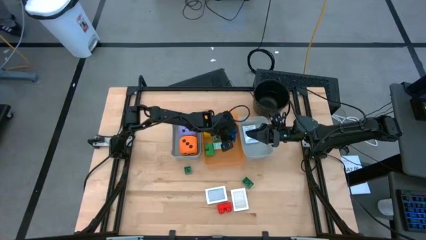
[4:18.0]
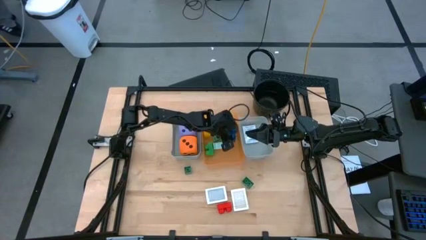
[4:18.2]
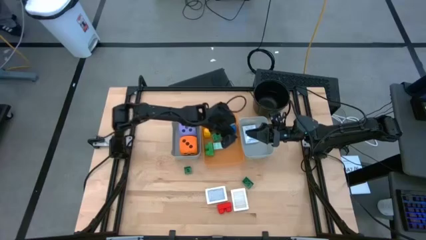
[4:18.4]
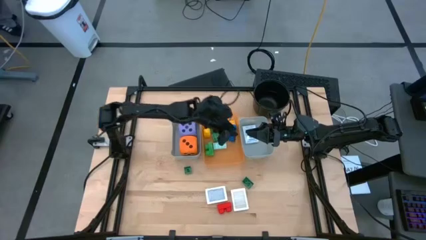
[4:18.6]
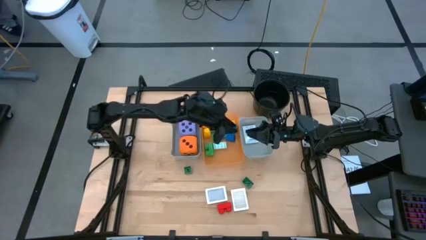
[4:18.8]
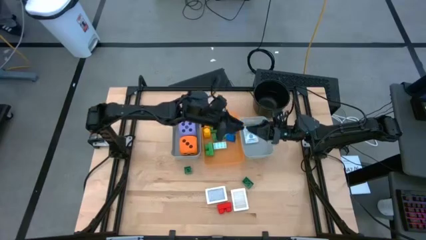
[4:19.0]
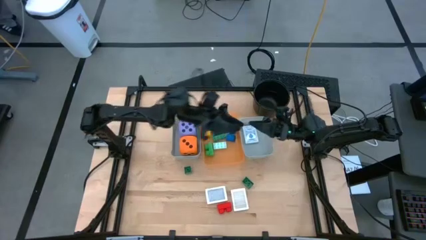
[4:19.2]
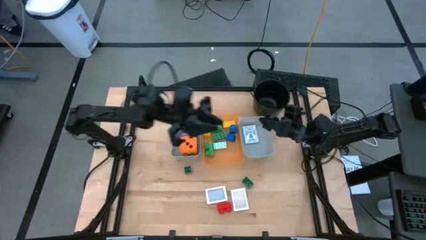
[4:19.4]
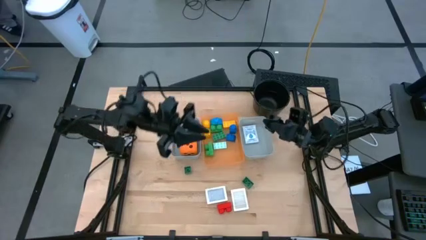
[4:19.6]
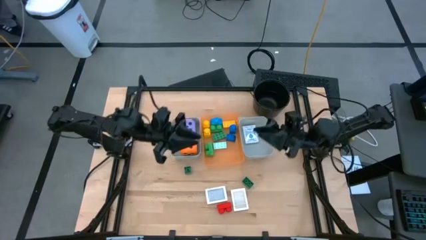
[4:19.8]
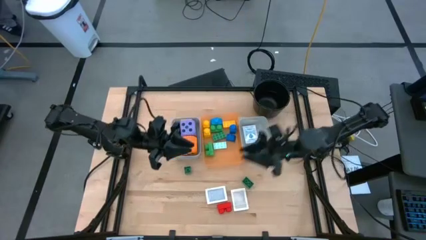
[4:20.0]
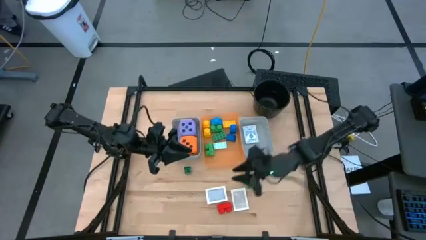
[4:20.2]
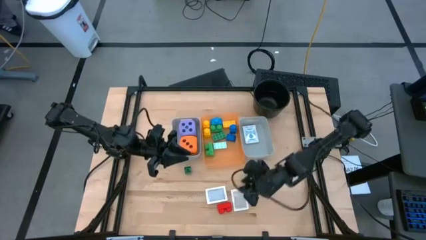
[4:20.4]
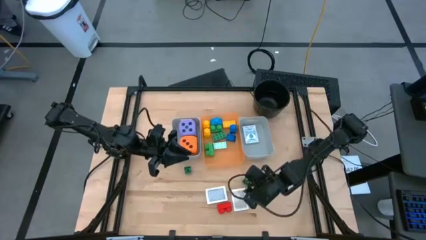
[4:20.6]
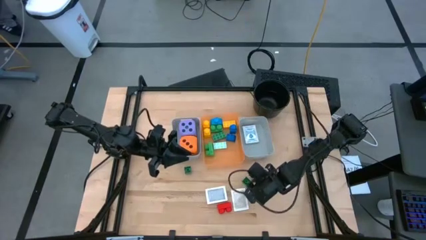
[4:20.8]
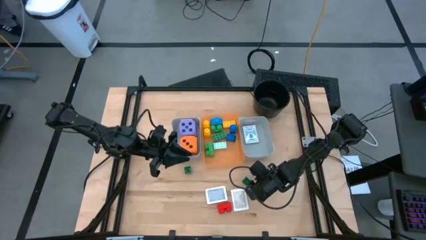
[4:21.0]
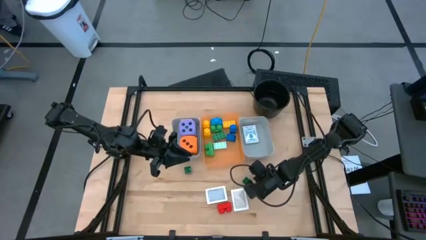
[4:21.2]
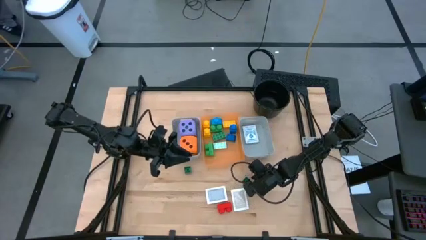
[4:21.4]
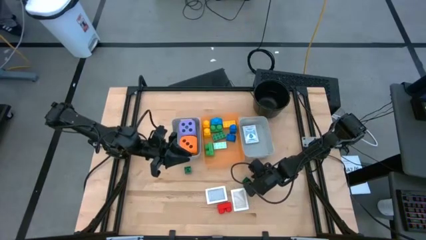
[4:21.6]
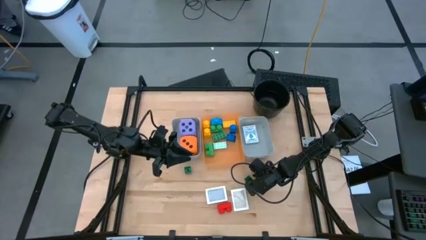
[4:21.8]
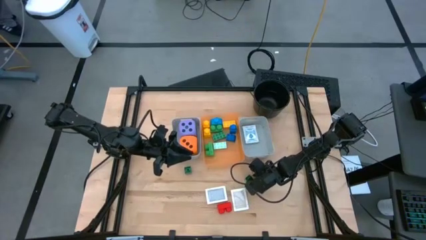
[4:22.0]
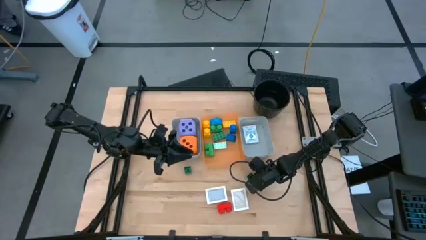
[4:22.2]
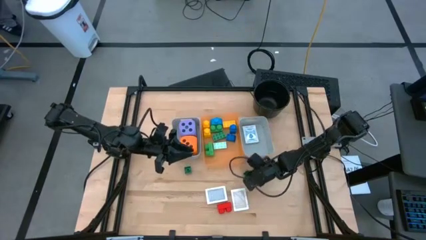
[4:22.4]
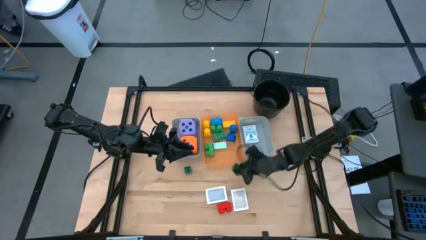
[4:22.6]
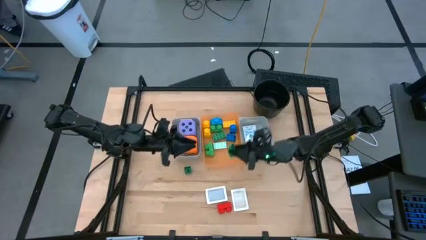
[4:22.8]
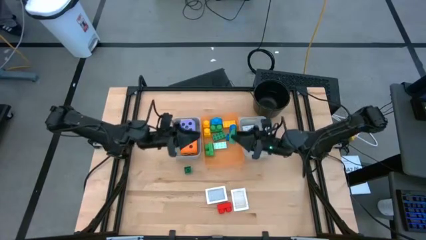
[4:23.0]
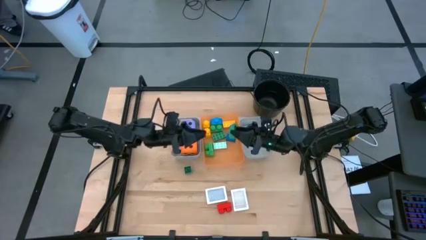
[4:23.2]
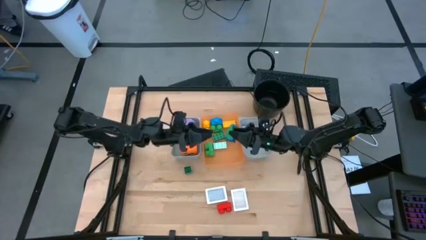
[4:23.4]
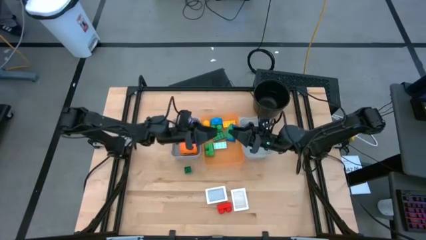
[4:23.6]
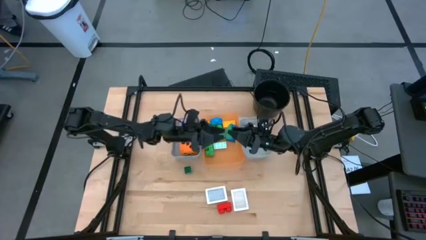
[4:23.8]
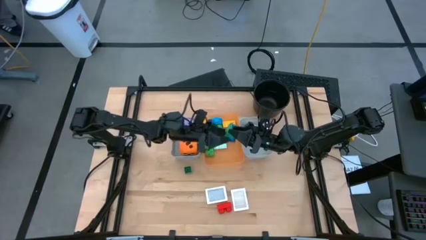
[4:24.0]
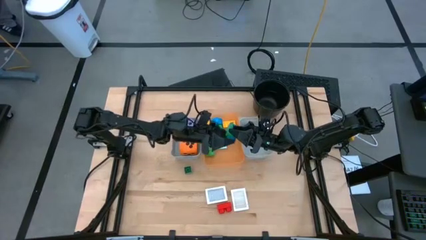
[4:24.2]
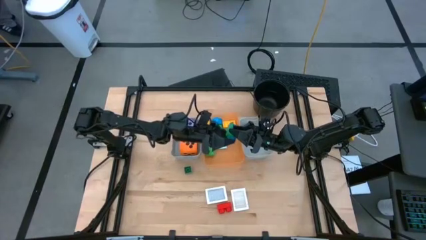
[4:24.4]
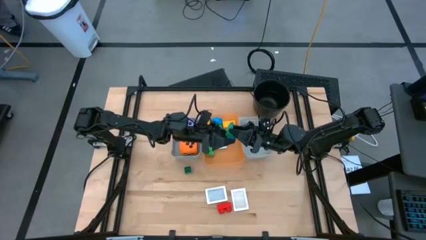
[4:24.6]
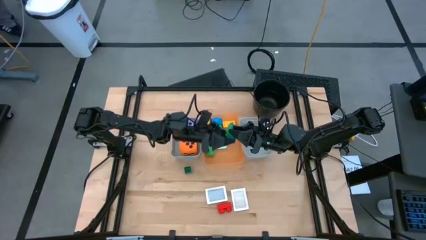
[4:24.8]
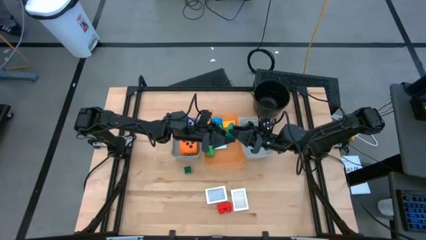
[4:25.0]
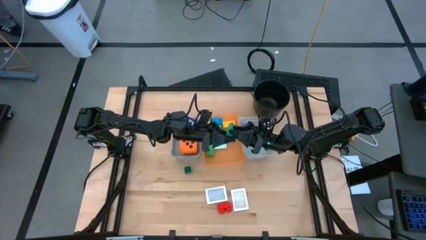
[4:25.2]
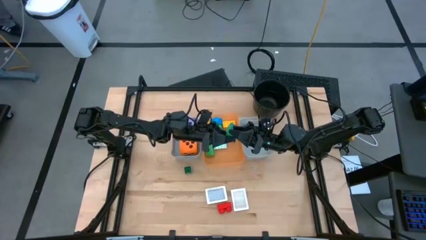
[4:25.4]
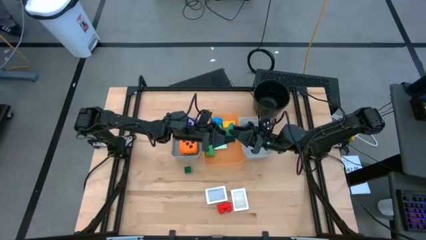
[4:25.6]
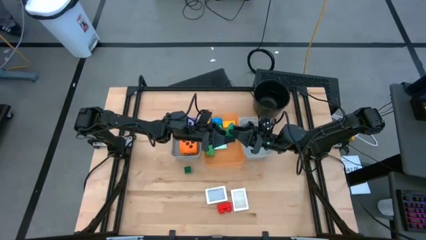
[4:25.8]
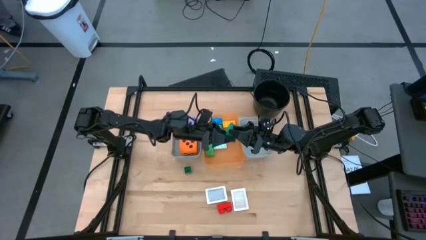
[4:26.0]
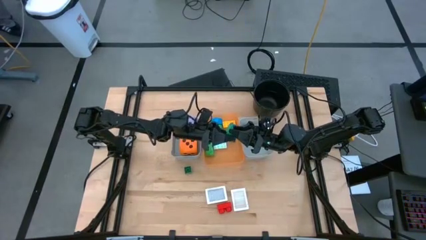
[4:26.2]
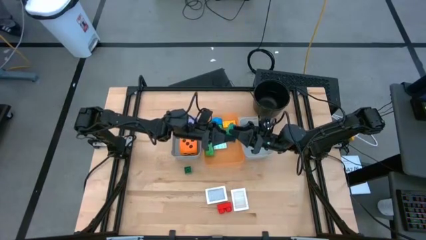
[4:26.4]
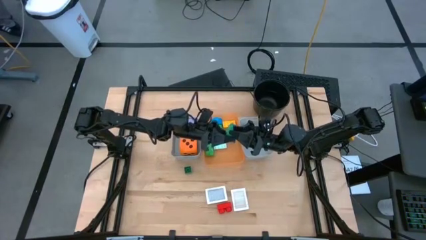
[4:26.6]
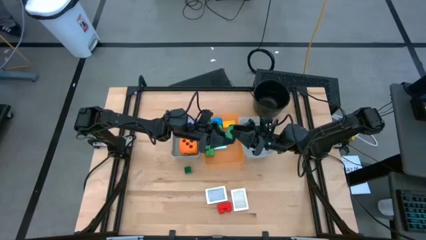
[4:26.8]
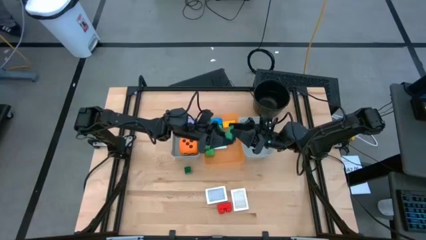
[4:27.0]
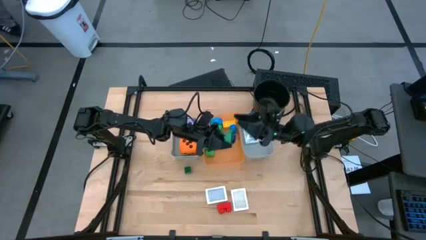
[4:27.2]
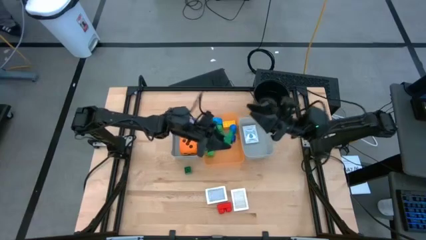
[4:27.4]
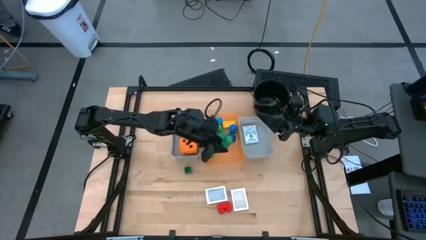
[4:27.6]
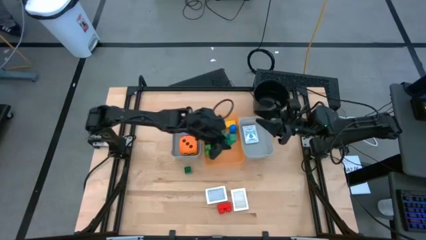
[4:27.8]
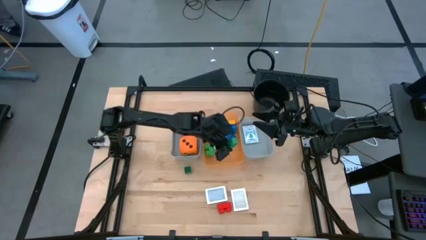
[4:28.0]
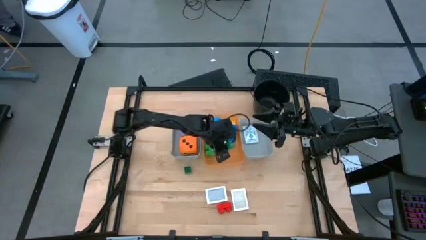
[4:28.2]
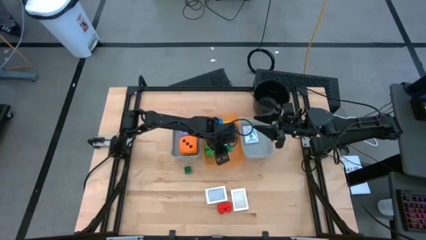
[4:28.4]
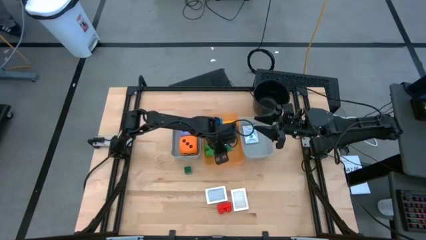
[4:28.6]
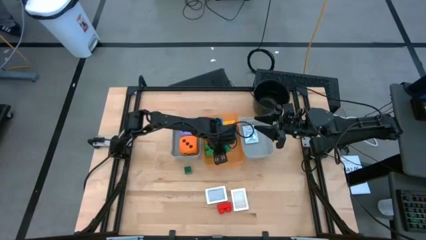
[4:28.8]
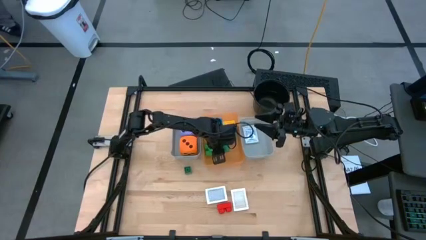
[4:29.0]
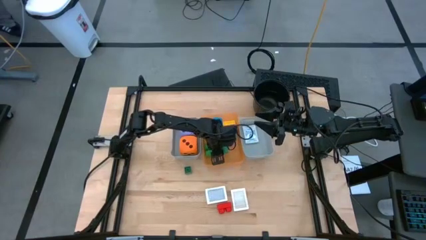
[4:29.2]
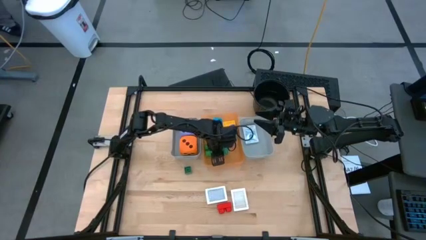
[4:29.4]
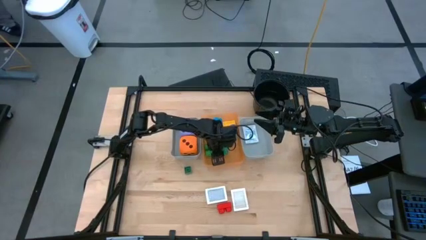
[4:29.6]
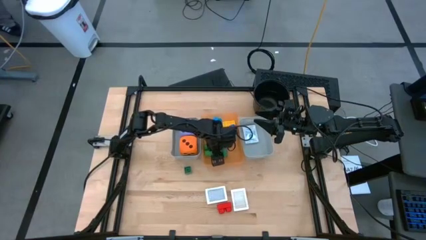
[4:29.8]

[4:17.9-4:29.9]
Task: Pick & Place Toys
Put the green game piece into the orange bin

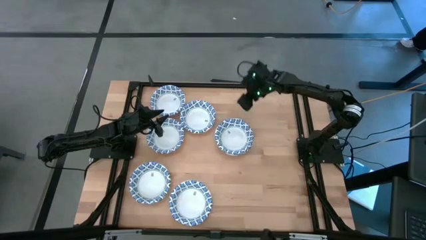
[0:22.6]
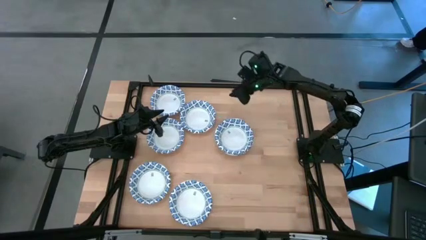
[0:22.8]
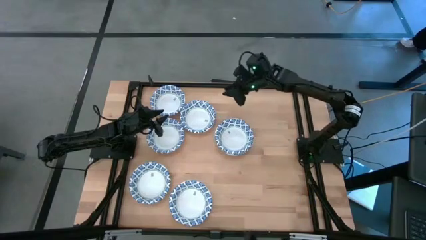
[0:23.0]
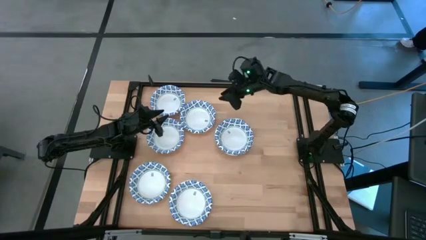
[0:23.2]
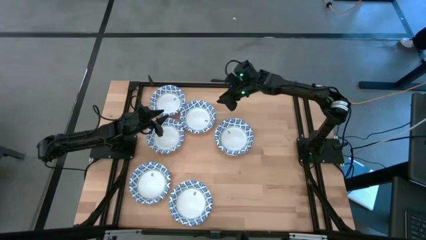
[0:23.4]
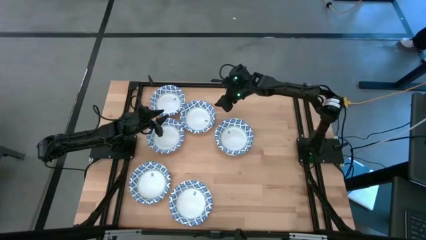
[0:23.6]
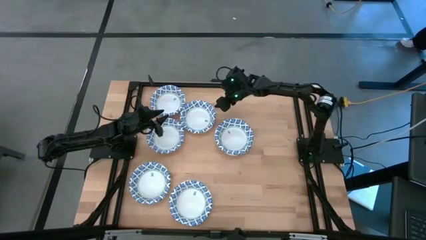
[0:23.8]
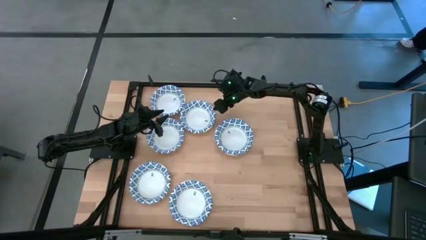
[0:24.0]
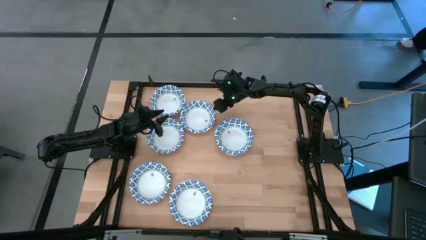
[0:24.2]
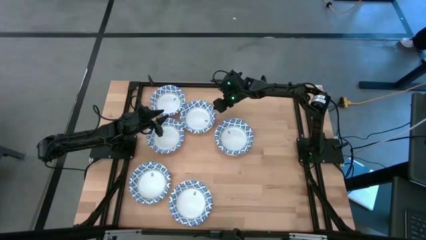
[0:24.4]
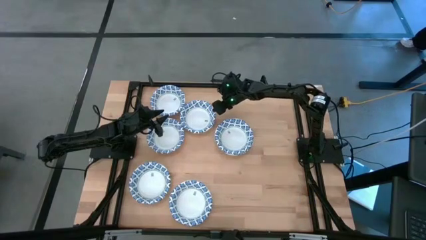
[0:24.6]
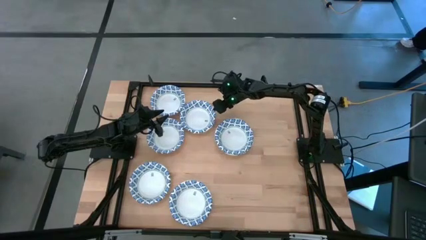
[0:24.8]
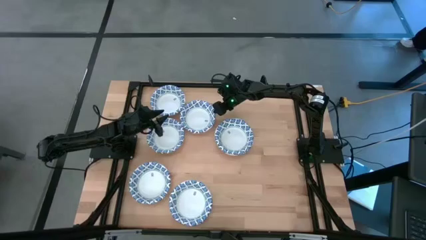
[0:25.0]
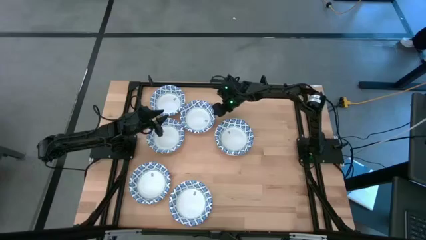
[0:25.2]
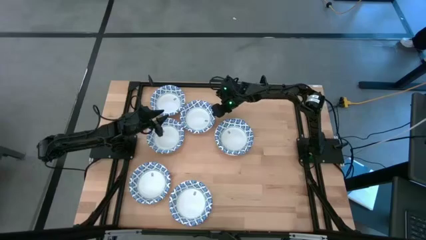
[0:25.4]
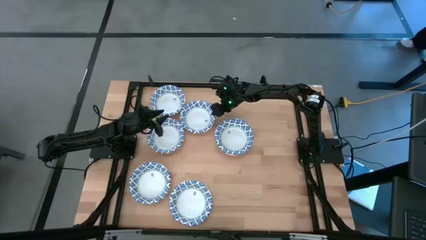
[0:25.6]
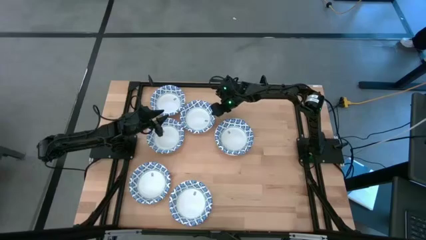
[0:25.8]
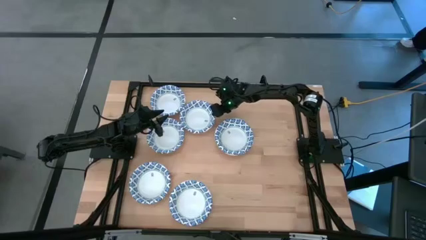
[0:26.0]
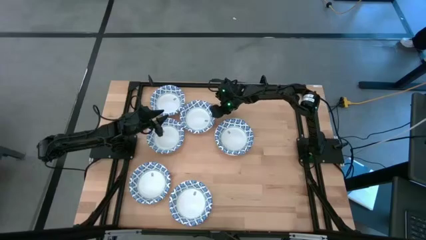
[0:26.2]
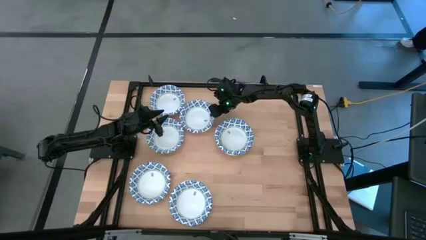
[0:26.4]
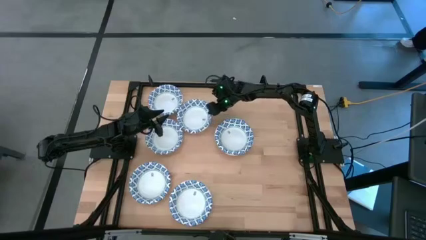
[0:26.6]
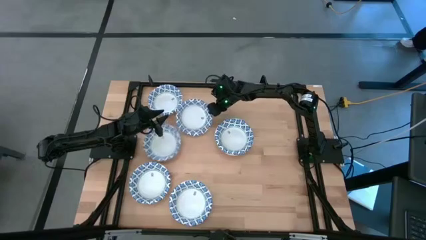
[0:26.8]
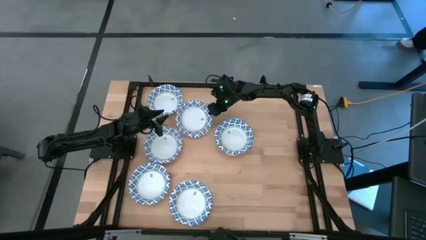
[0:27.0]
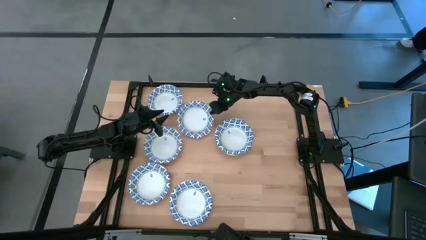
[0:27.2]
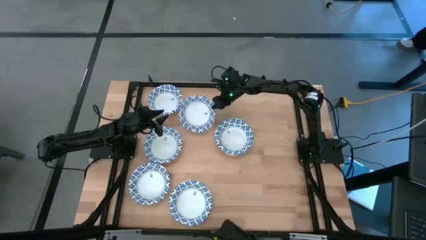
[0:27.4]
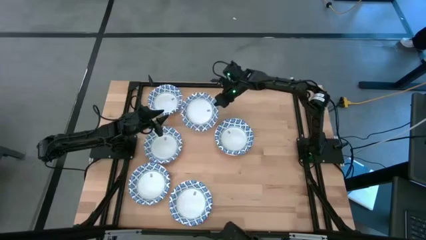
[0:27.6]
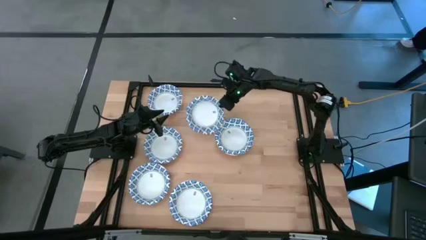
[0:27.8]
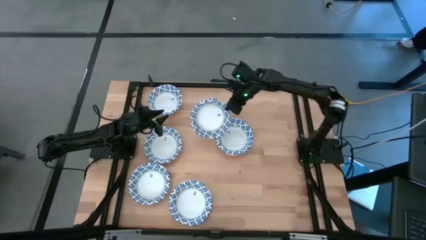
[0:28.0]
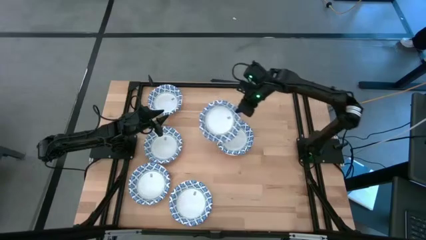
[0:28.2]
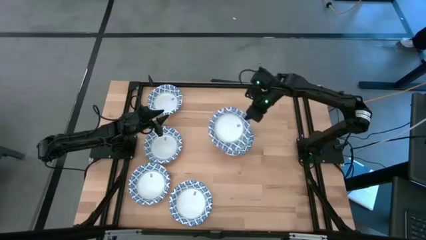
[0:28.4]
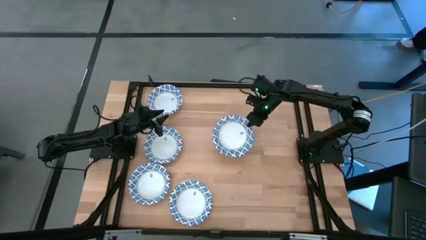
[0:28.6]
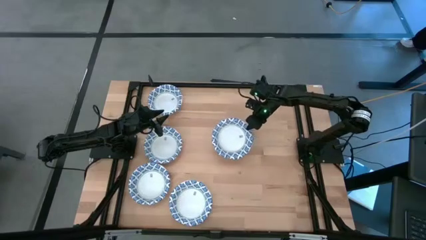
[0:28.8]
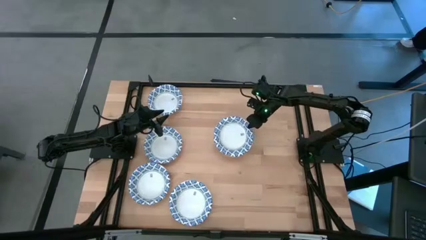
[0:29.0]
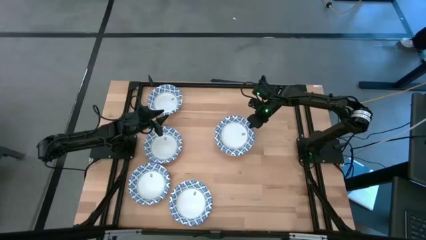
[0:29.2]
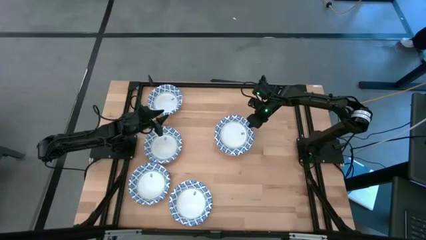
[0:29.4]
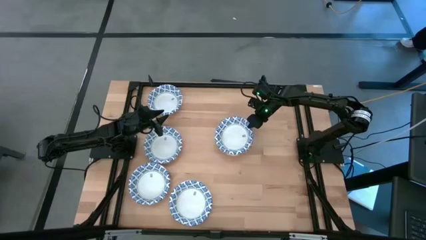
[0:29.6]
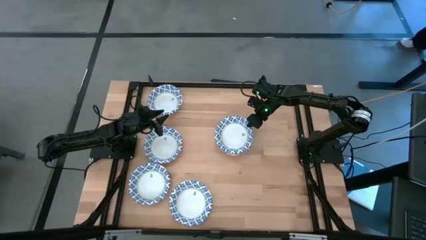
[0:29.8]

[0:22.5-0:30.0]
Task: Nest bowls inside each other
Stack the blue patterned bowl on top of the other blue patterned bowl
